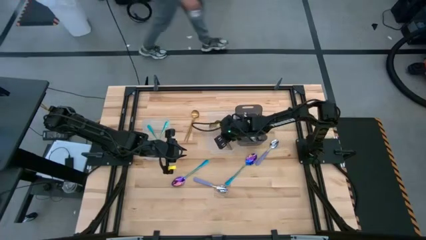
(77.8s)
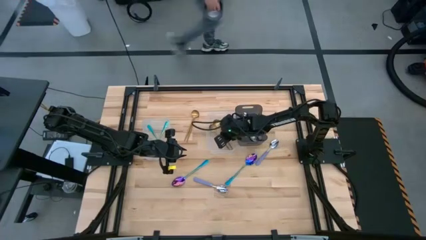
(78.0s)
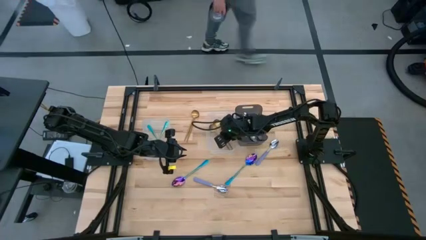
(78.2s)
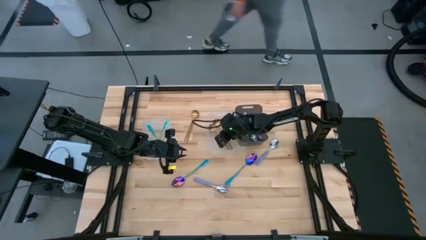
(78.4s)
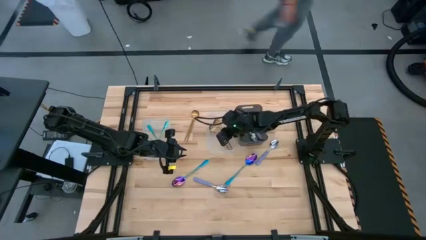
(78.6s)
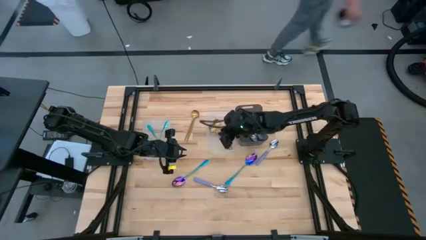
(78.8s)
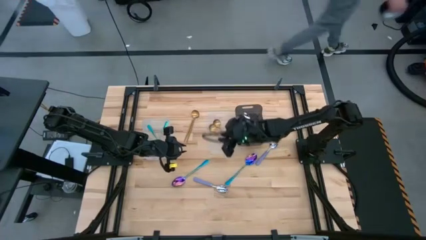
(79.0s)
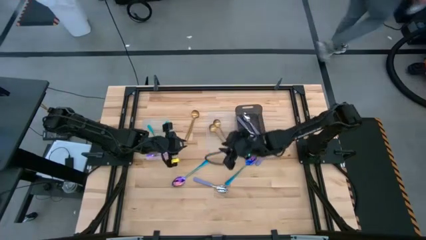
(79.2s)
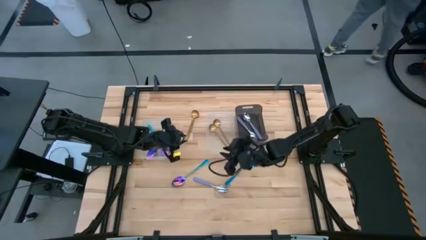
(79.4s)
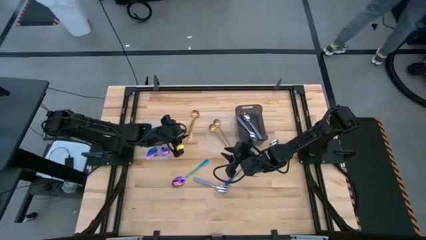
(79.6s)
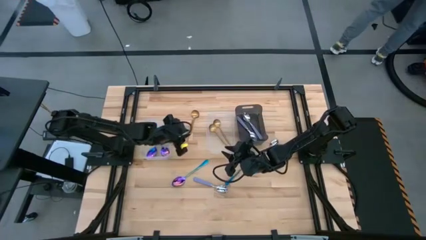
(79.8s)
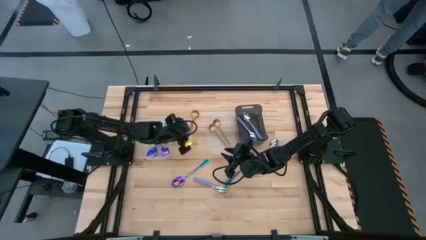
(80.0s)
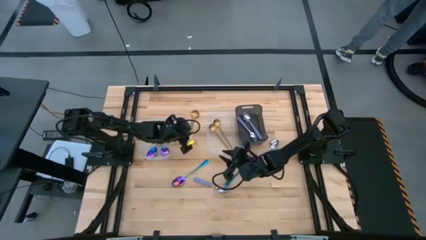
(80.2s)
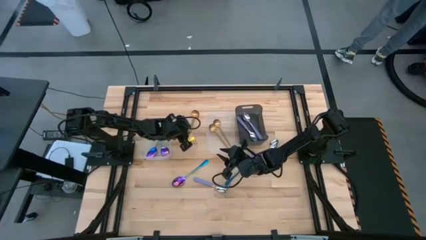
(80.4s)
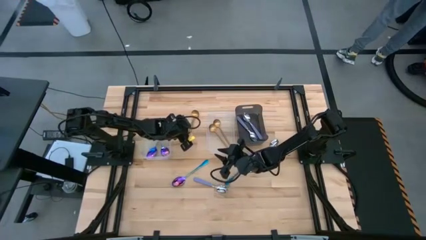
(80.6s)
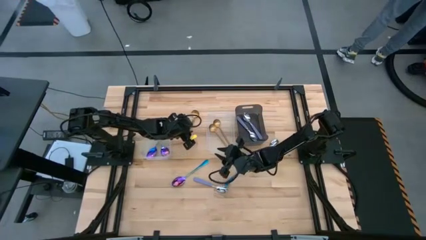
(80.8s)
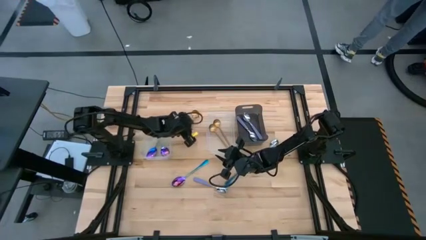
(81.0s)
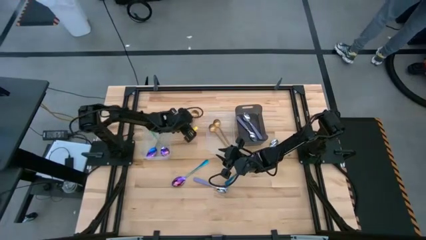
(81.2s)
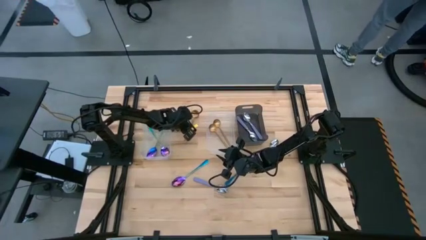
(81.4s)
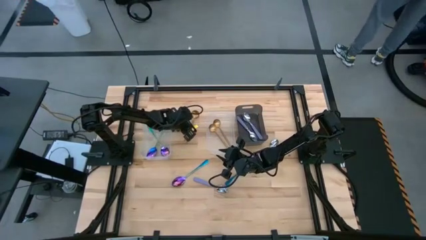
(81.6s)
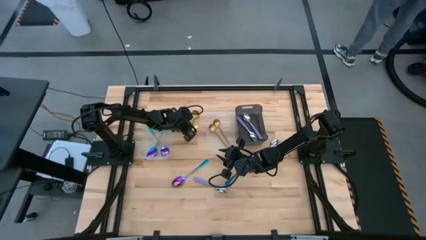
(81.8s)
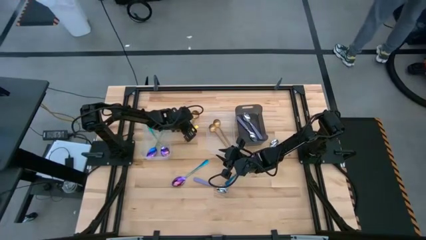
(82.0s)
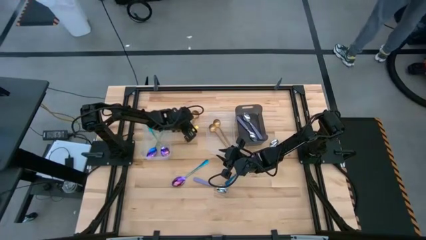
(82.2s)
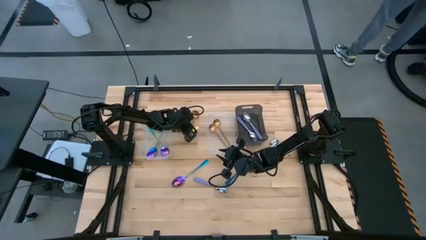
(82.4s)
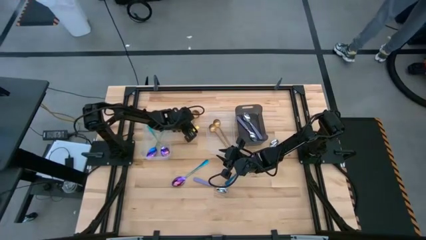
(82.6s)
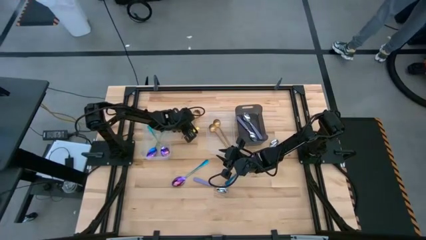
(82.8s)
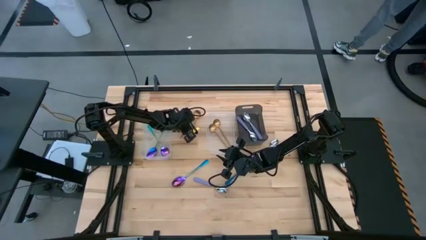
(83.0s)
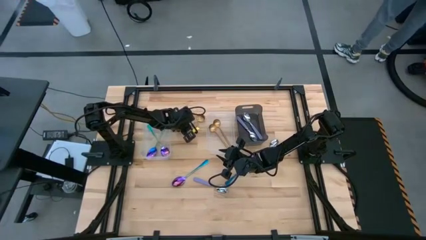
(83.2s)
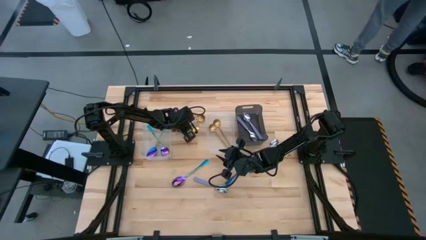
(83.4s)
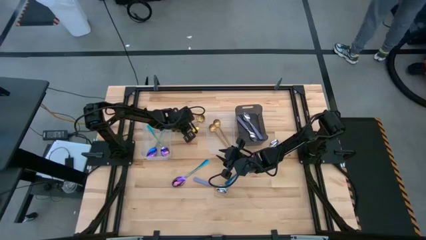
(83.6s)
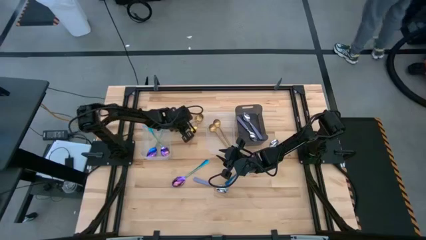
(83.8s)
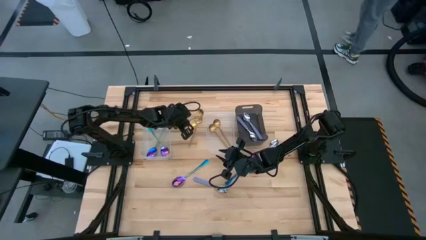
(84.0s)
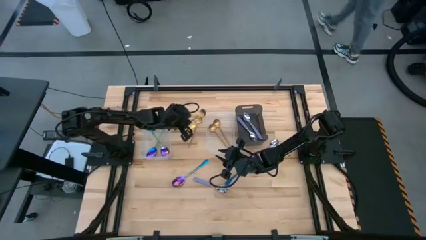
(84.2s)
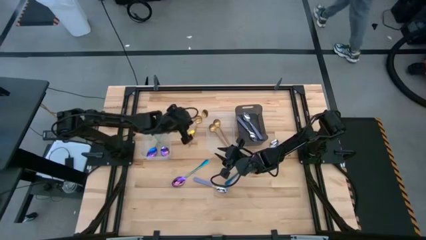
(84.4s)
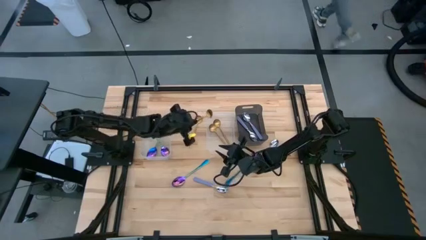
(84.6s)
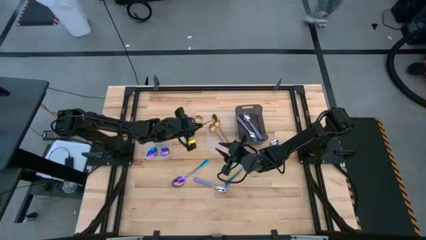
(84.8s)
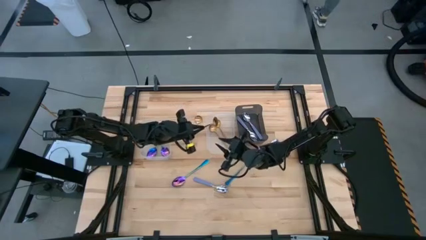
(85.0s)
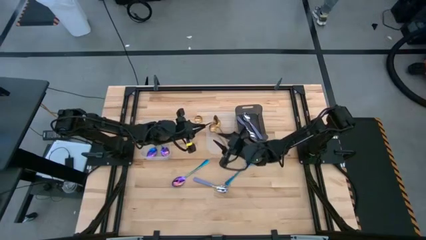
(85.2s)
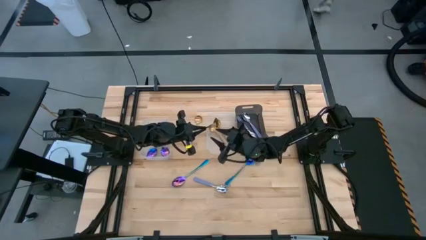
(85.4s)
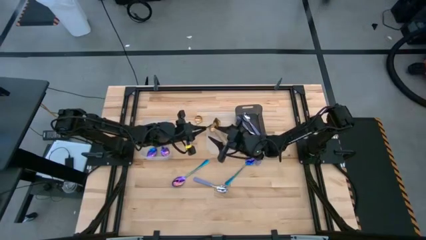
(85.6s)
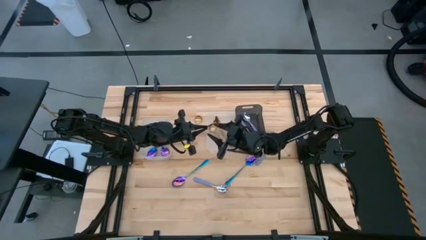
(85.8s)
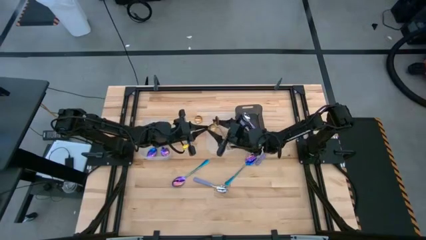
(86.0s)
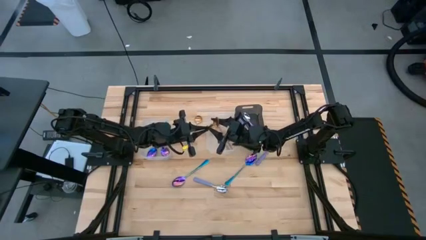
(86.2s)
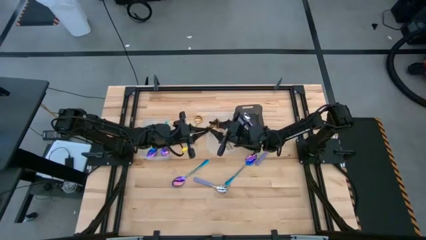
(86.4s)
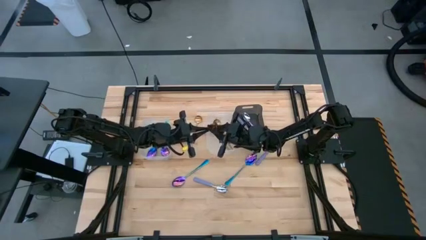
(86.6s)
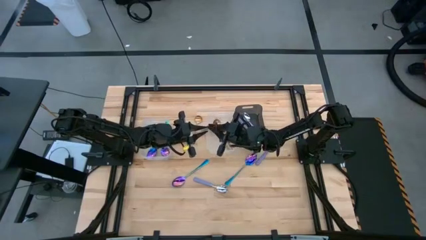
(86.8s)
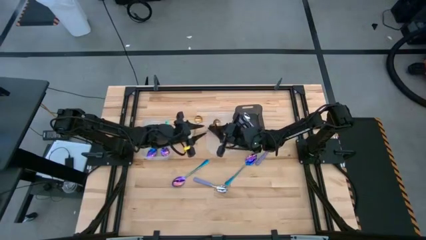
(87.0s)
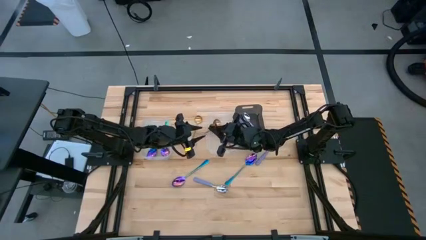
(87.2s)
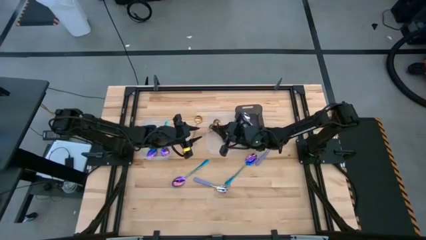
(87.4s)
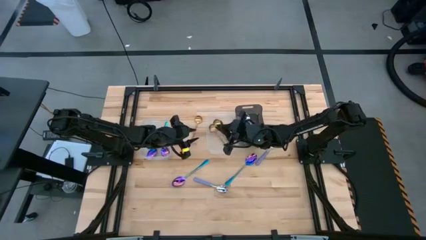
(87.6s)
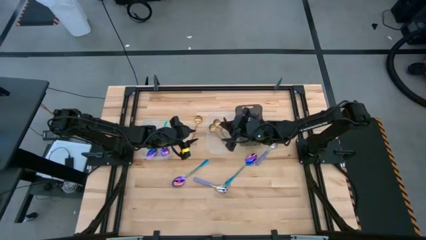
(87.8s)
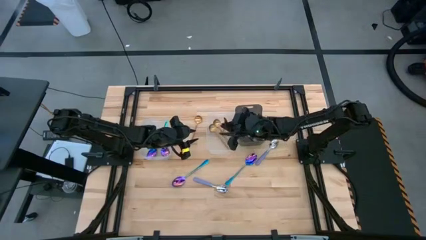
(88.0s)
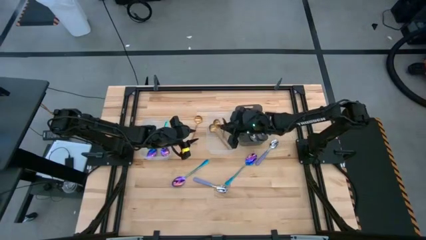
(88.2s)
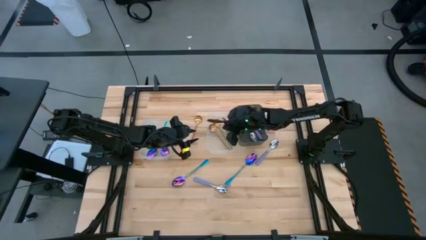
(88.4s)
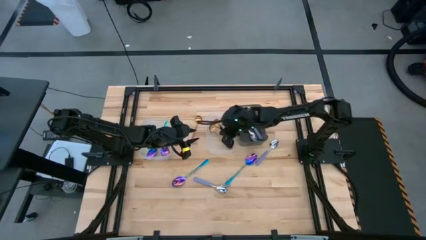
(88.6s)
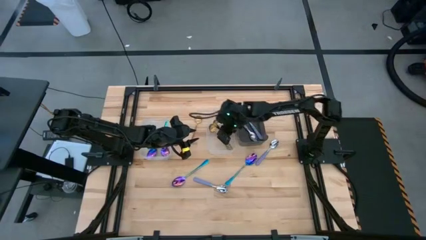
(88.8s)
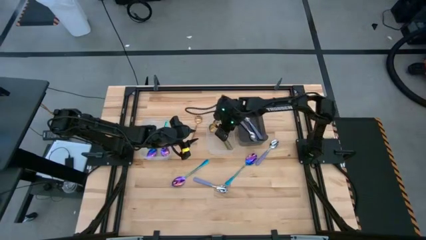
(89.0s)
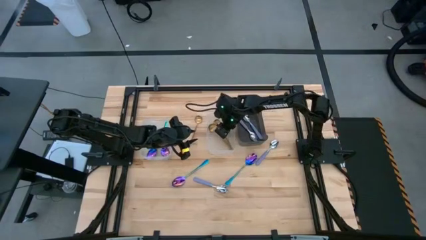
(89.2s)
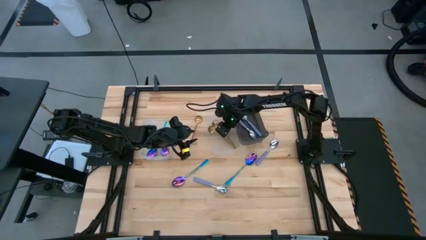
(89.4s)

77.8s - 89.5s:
Task: Sort silverware by color (type)
Put the gold spoon into the right transparent bin

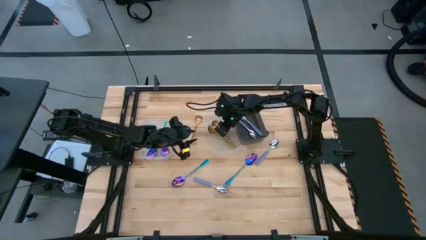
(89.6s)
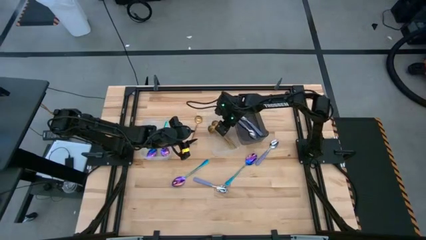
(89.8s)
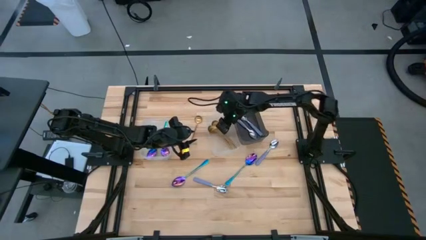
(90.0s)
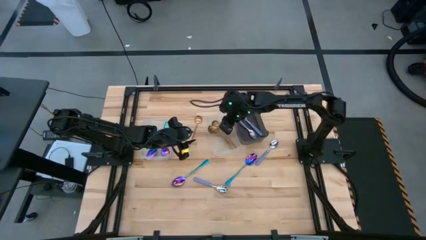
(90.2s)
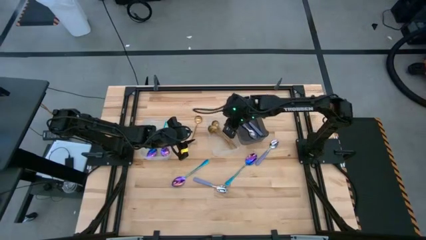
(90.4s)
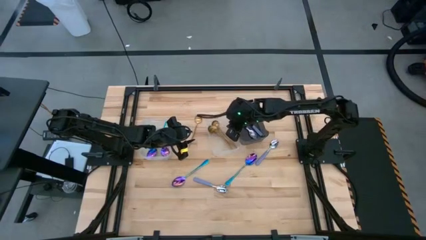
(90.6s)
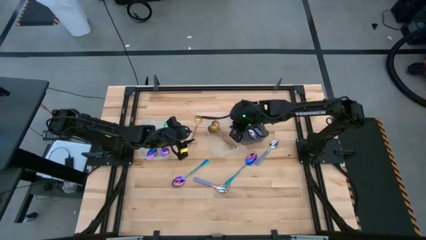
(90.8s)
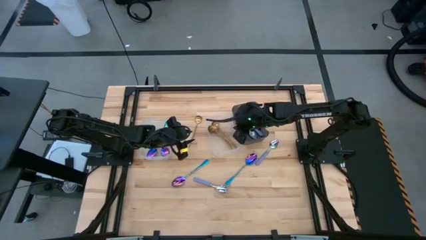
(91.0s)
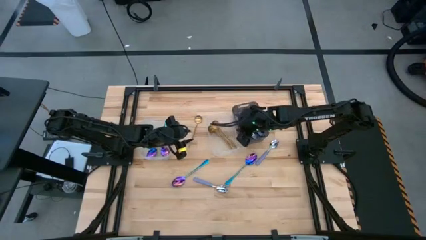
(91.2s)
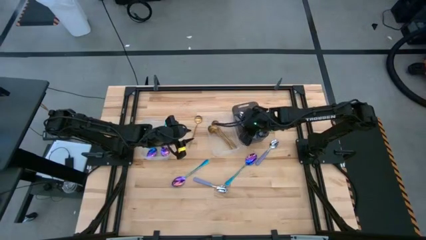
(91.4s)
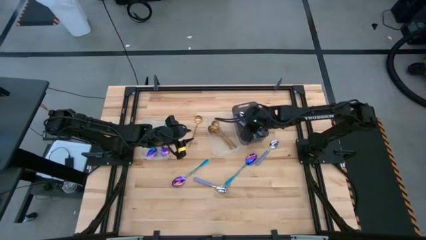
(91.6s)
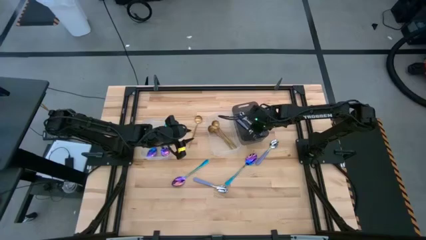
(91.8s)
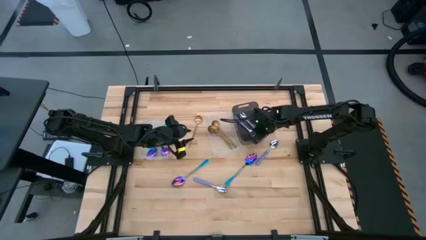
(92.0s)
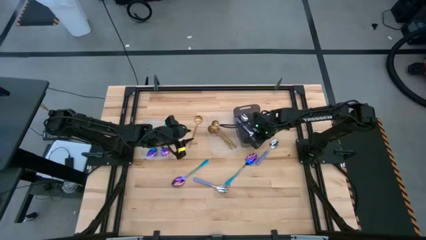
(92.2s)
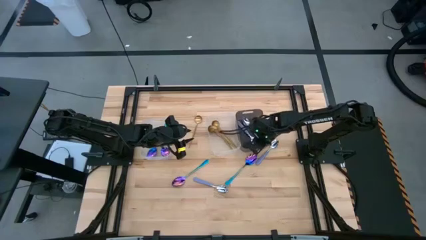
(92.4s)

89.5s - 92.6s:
Adjust the black bin

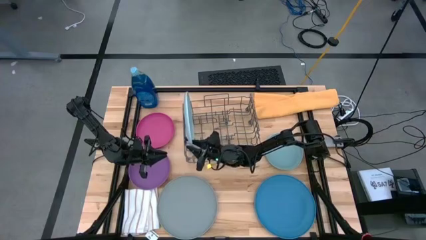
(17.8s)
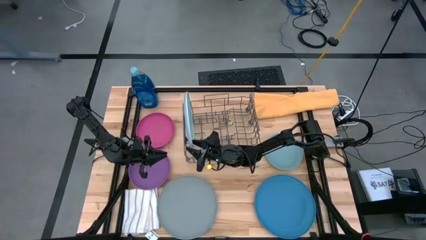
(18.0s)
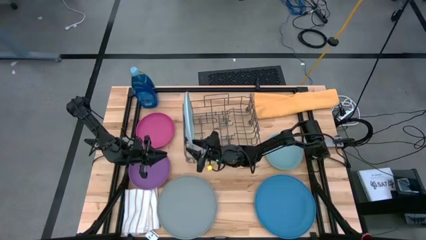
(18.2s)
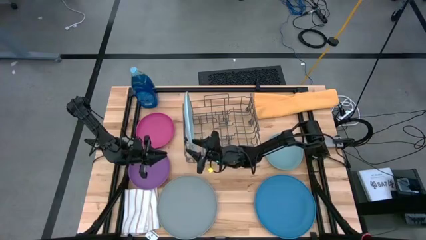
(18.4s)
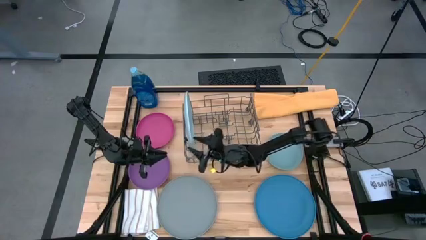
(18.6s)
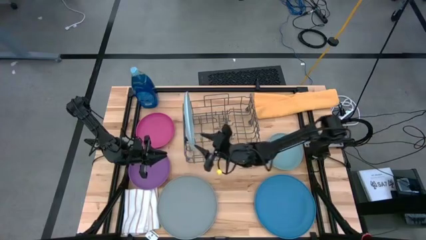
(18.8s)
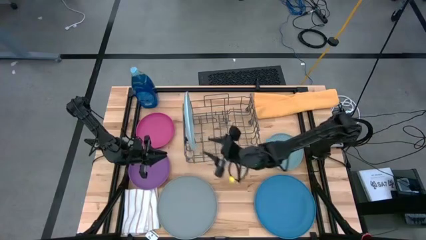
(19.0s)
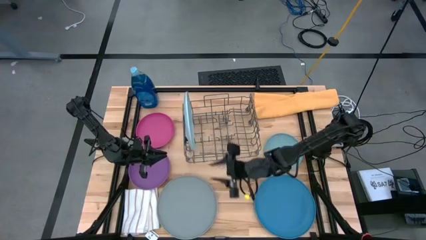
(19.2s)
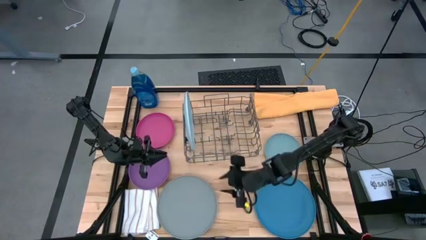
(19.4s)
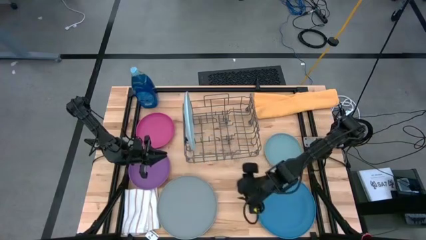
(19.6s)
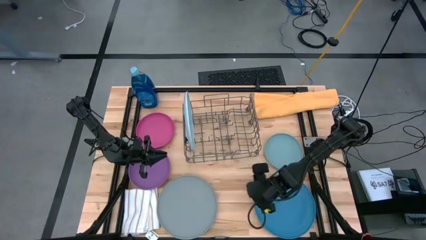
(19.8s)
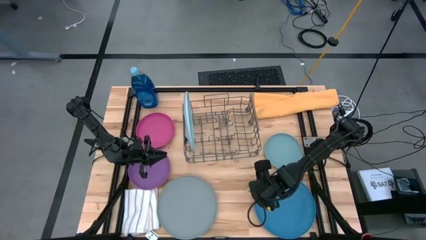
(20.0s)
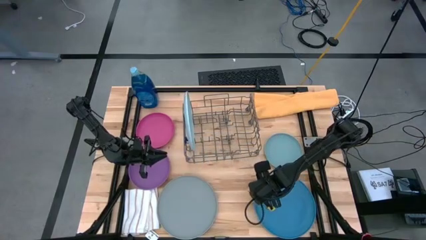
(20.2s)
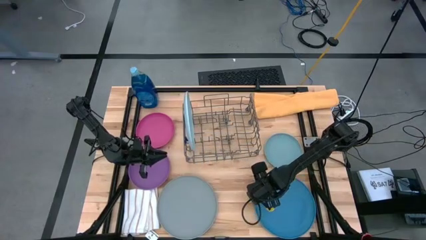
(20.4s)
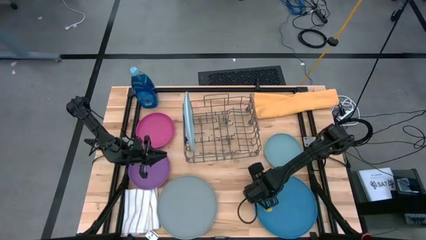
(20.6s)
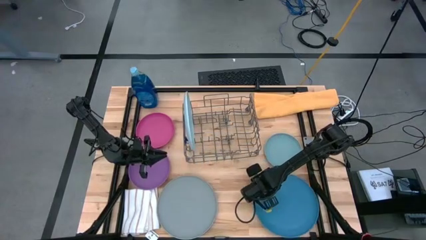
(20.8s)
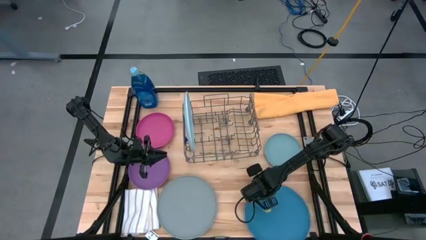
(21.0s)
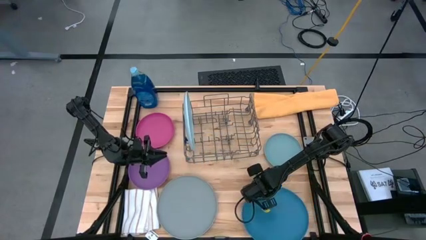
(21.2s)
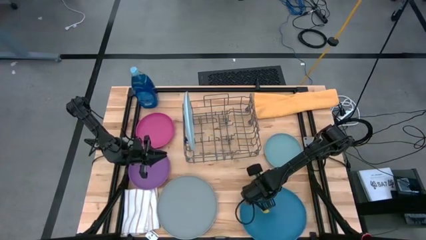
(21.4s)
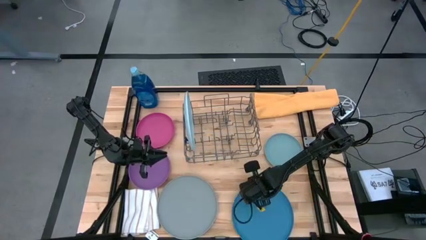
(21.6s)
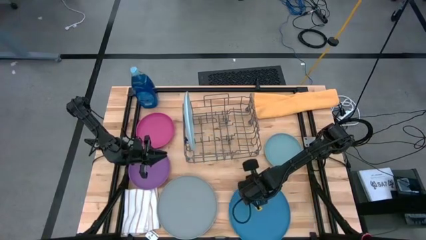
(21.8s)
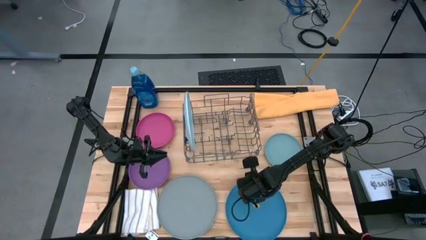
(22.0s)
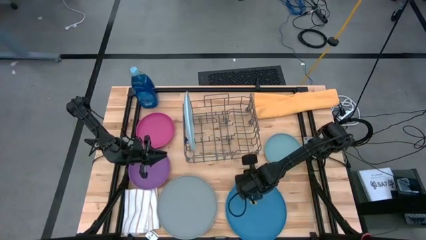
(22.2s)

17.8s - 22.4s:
Task: Sort dishes
Put the blue plate into the dish rack
